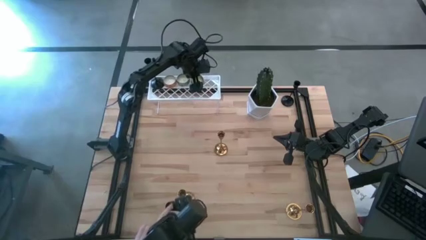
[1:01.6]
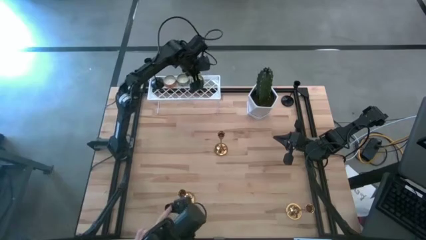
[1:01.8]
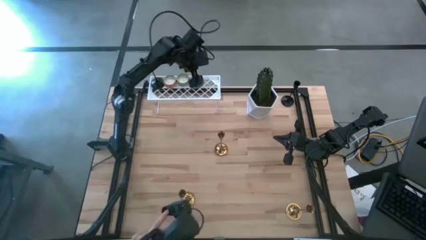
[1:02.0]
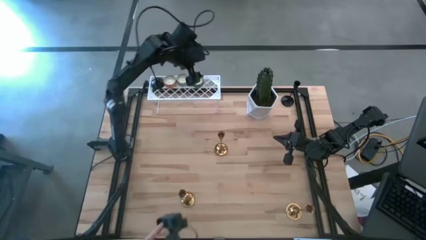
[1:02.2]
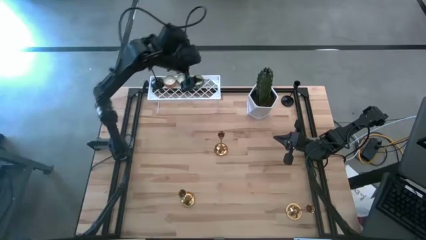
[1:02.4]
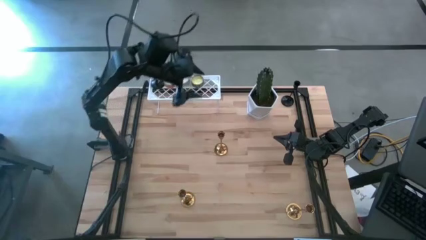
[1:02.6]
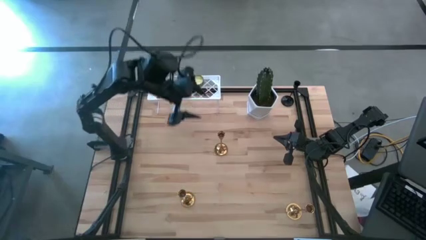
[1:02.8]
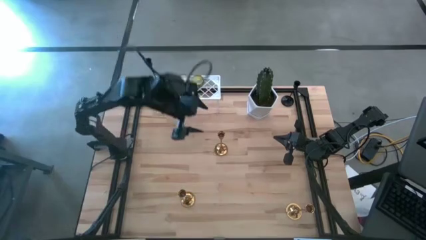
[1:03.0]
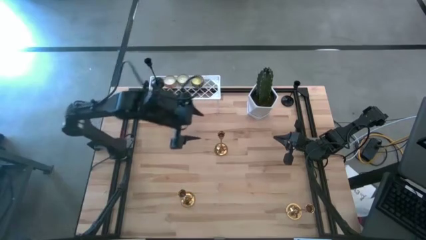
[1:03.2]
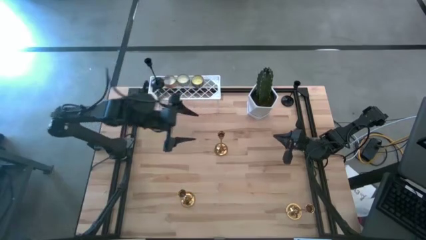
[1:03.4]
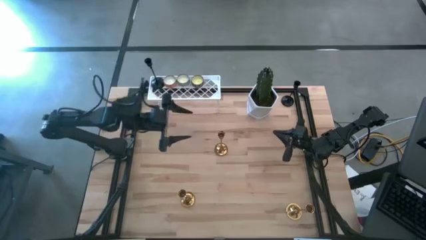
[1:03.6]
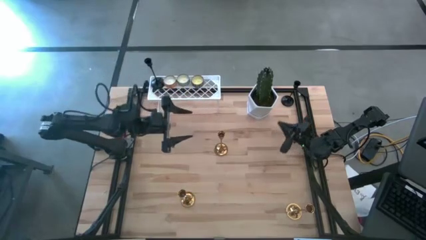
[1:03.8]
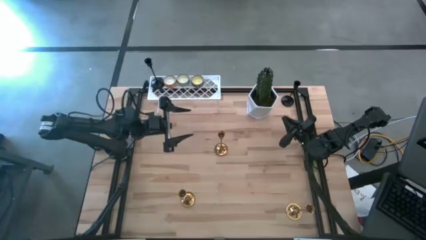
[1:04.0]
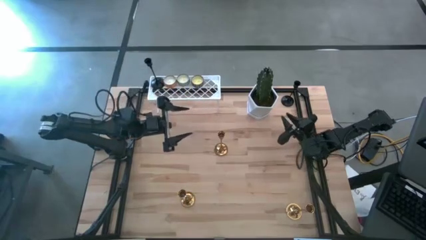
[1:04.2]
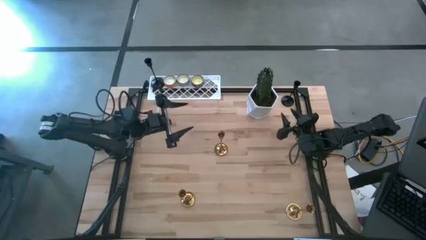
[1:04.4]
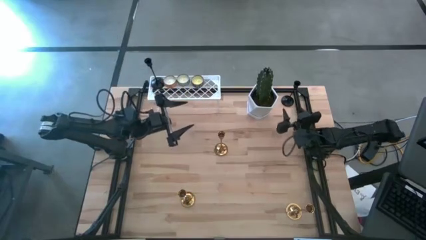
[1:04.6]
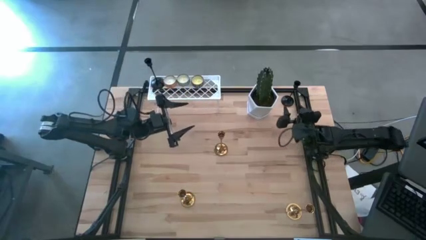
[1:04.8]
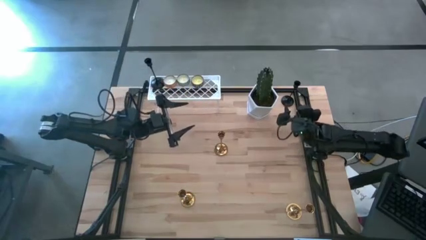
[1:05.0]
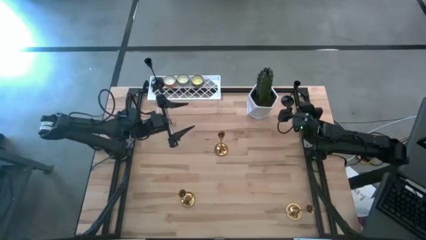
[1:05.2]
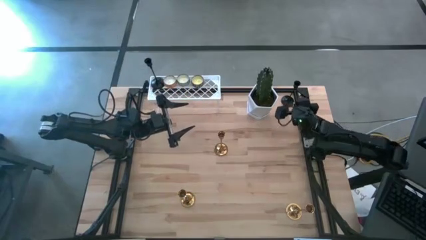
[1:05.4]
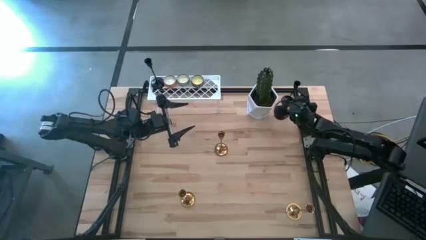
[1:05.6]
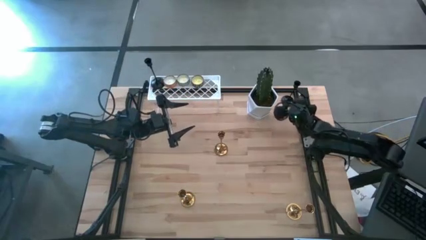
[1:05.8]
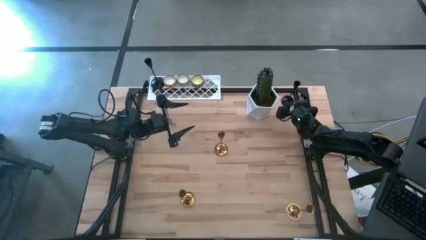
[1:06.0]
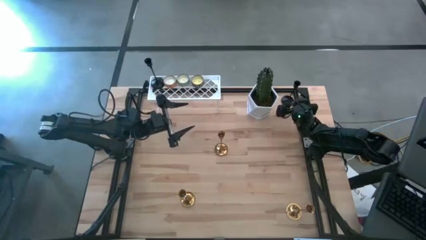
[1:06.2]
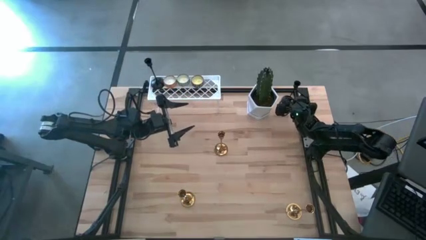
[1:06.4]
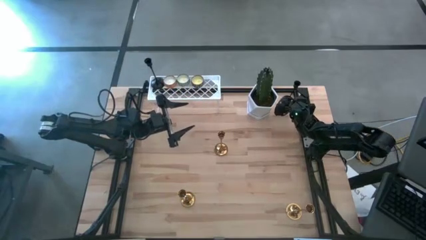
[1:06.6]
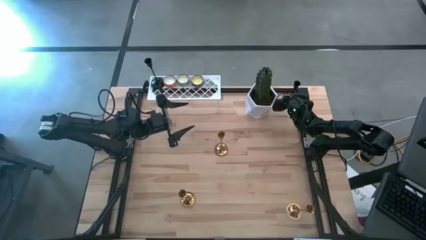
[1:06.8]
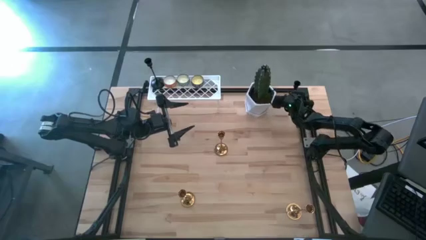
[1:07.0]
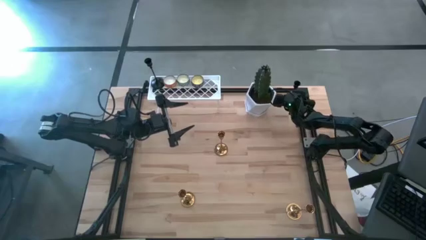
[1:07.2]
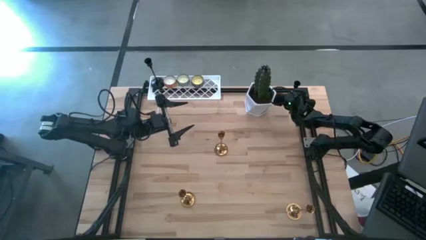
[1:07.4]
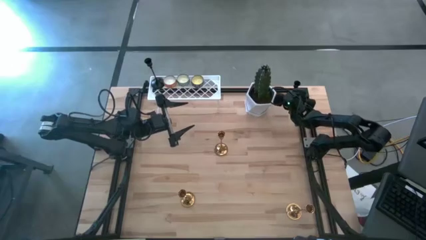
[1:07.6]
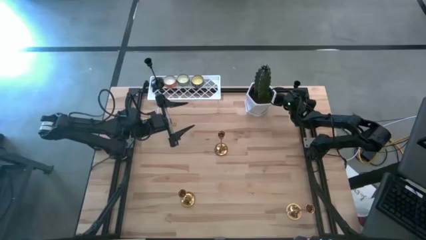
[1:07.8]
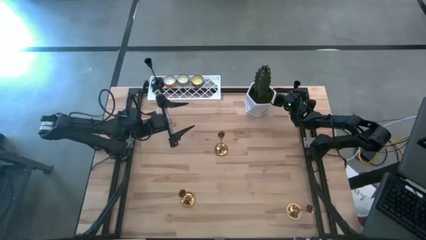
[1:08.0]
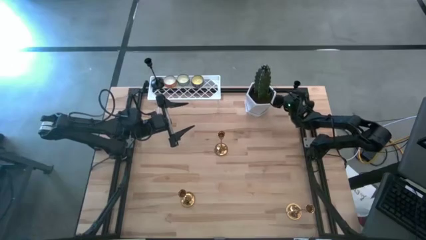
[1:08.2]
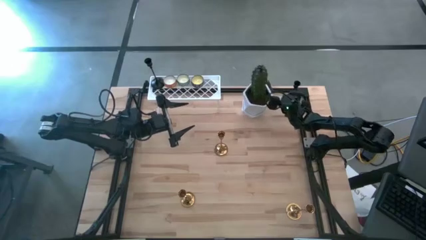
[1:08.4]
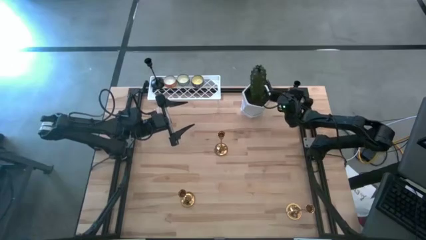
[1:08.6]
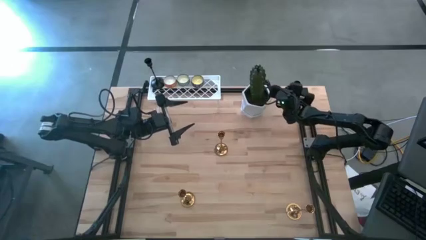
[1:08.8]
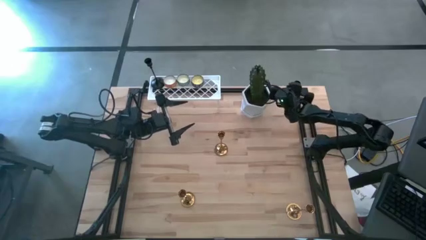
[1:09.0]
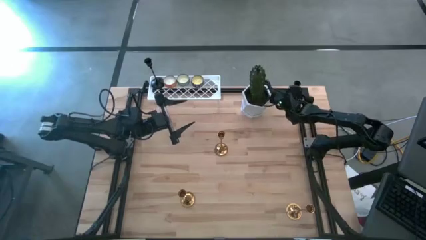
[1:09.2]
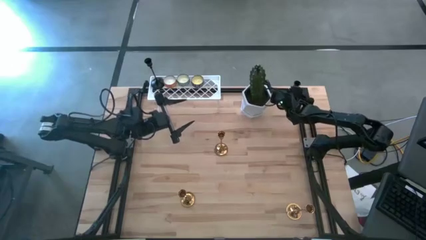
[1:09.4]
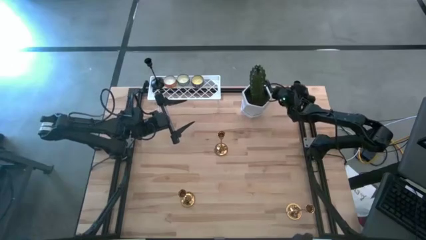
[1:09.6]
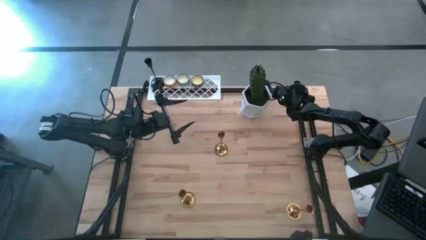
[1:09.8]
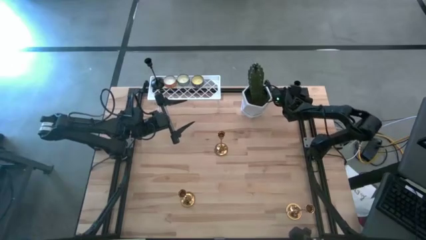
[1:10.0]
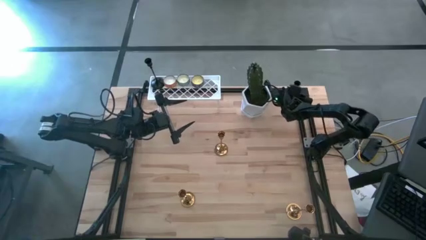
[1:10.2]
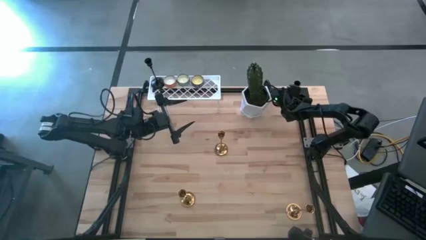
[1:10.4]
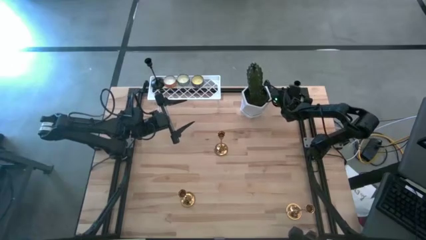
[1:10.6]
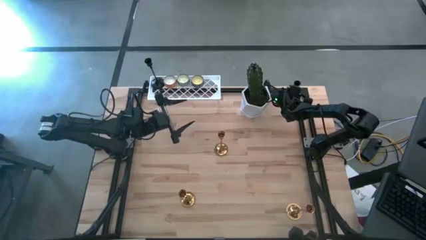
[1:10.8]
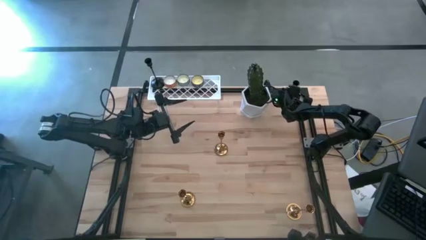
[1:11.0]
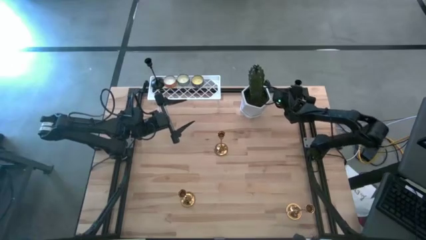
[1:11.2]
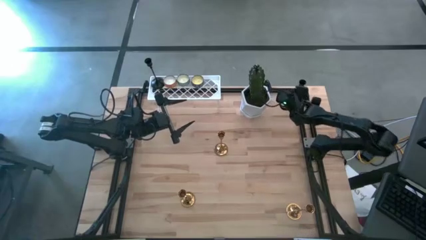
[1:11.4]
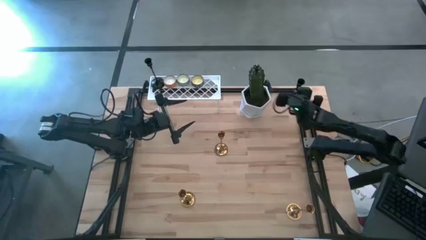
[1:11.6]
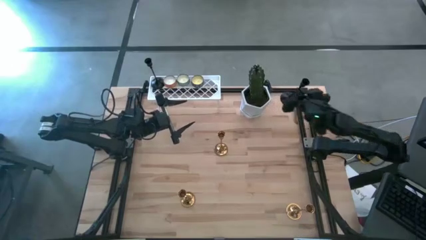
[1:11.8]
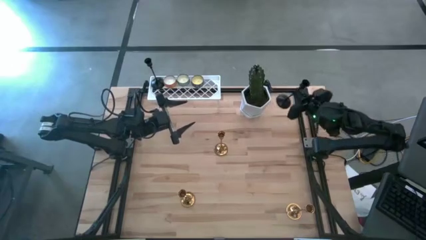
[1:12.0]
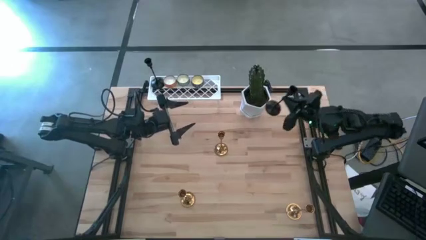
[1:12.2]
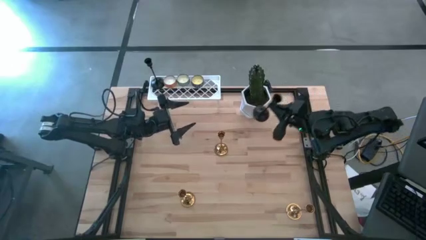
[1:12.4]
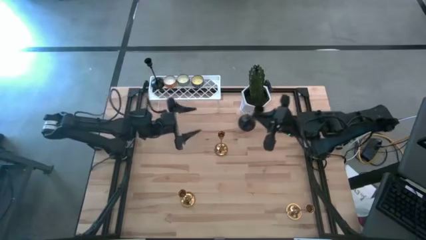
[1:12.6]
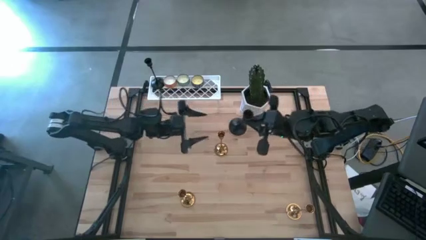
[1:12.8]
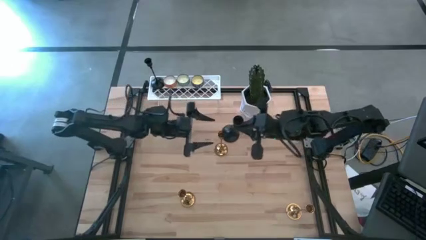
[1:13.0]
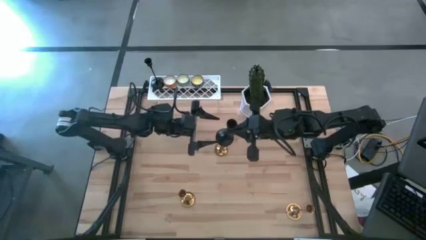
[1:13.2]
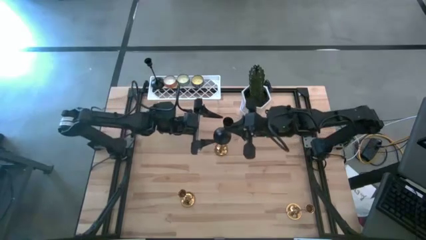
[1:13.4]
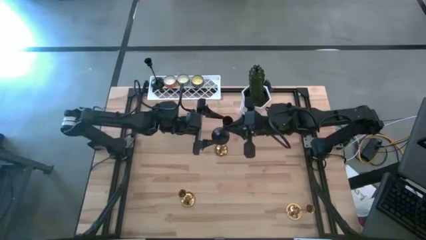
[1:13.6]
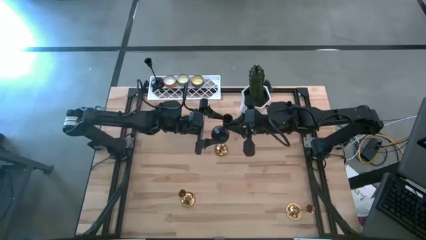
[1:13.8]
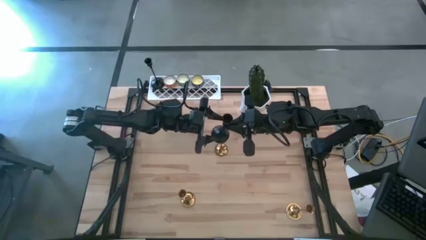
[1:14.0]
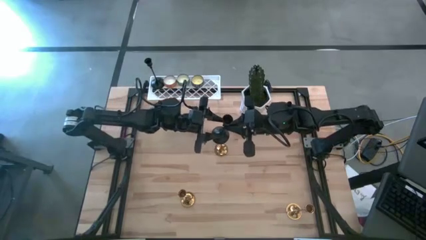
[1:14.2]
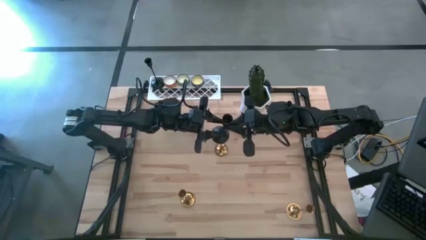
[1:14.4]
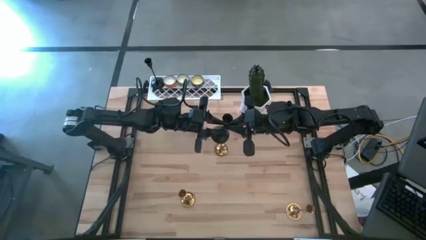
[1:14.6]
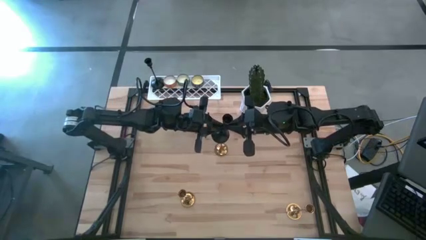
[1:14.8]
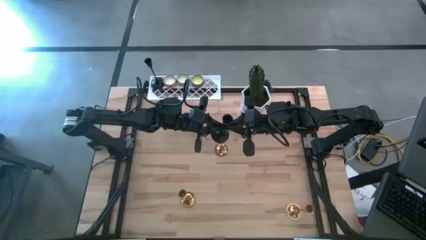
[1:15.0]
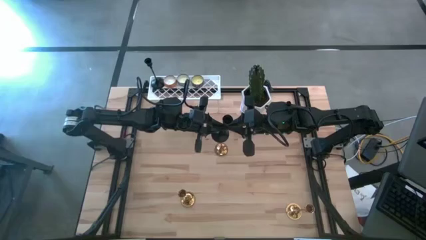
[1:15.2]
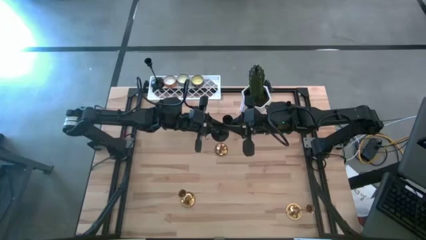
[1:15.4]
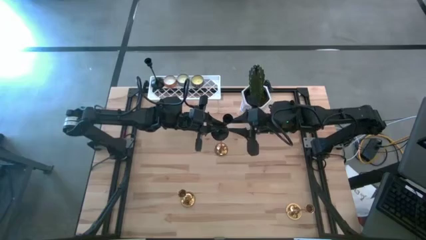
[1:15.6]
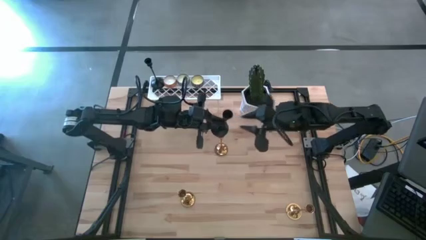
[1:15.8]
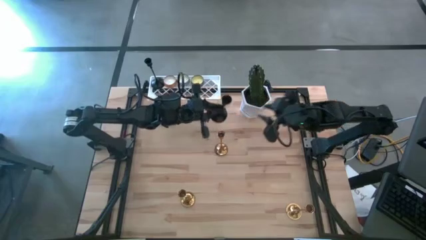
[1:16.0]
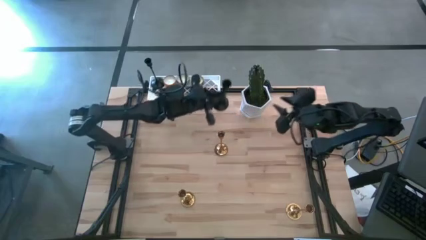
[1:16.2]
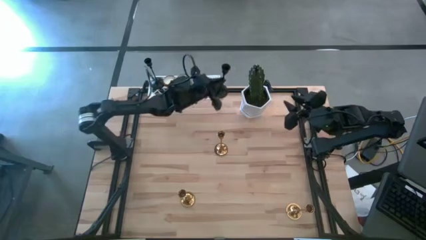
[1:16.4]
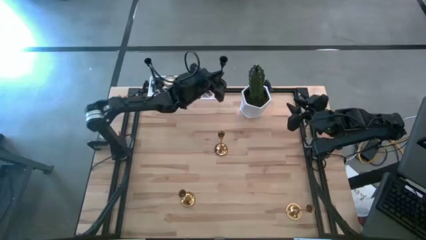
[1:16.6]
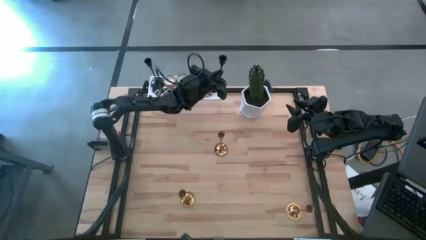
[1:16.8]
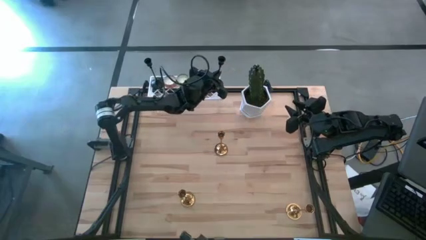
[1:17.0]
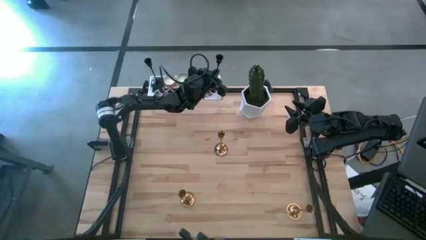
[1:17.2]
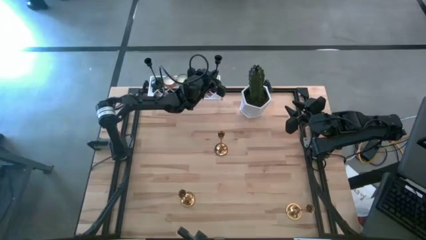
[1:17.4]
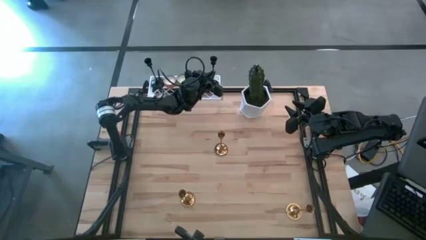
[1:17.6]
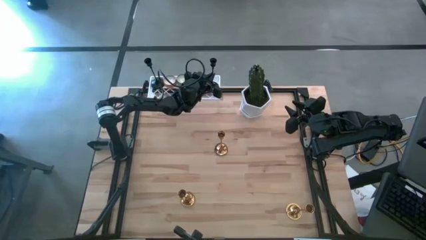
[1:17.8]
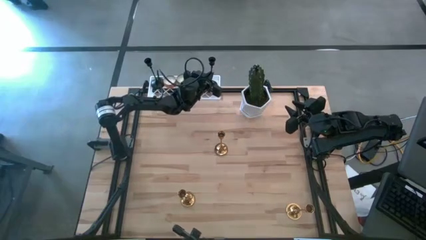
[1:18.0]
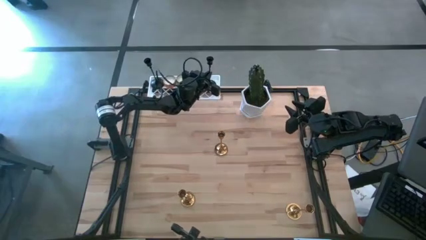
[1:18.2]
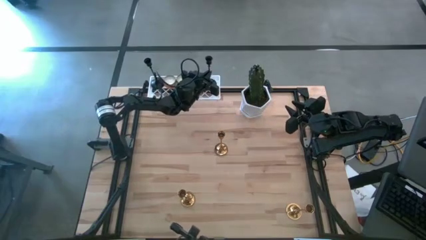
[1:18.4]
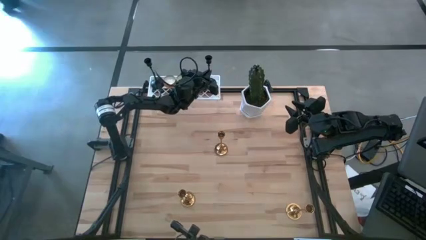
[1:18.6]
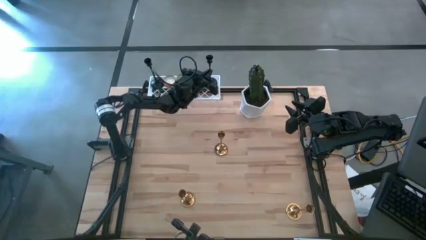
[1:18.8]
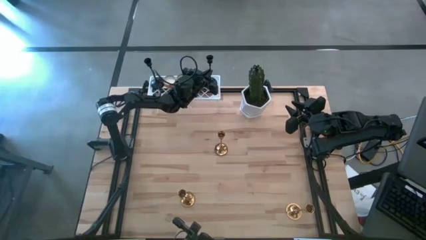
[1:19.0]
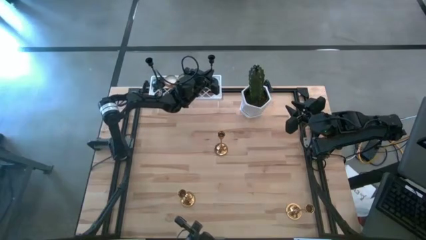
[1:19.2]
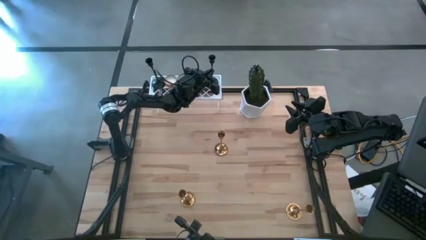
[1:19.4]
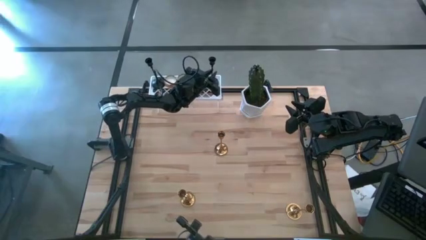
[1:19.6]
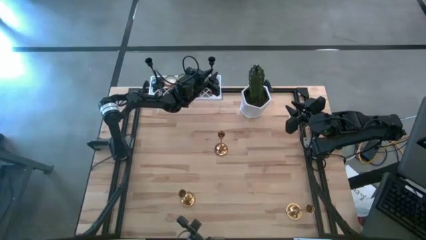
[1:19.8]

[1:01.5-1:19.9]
Task: Pick & Place candle stick holders
Put the black candle holder on the shelf
